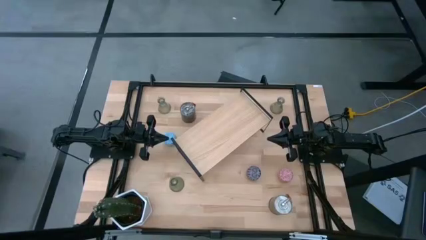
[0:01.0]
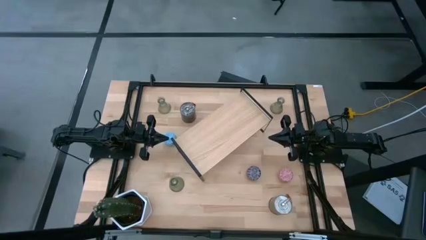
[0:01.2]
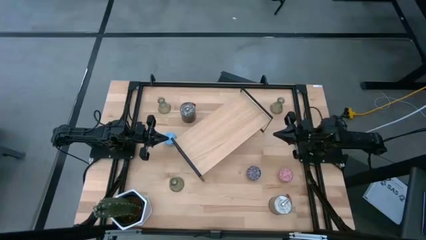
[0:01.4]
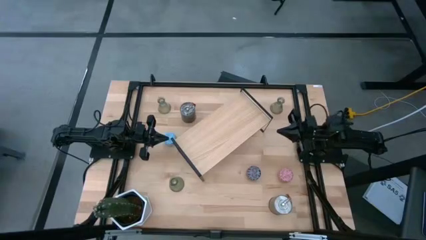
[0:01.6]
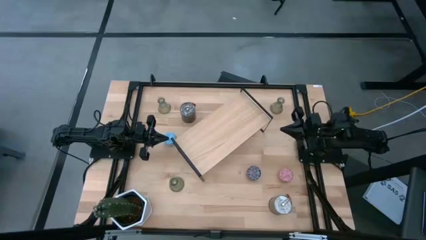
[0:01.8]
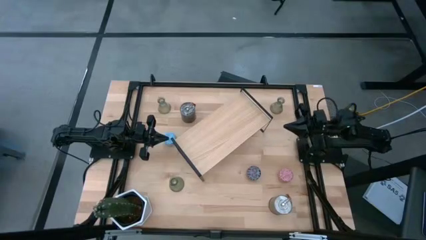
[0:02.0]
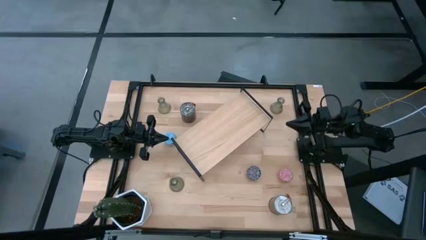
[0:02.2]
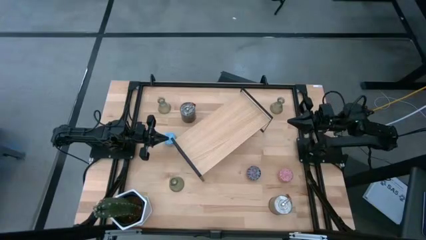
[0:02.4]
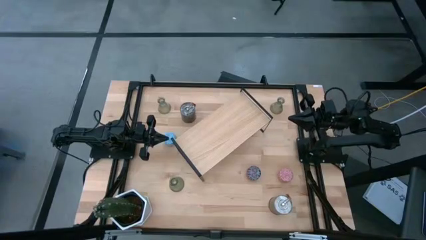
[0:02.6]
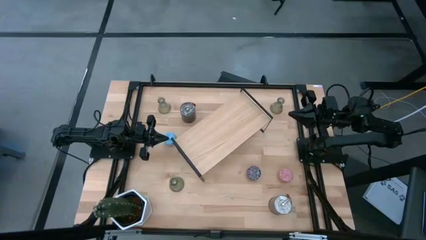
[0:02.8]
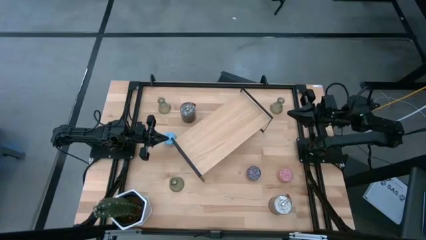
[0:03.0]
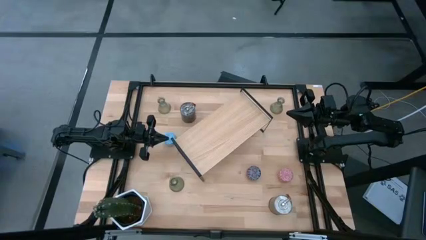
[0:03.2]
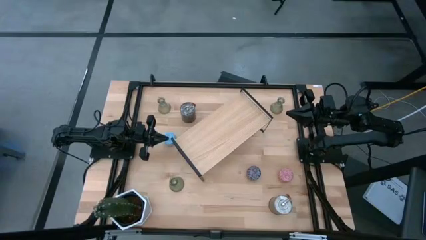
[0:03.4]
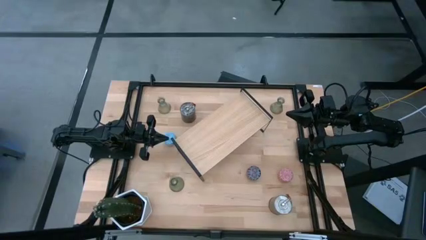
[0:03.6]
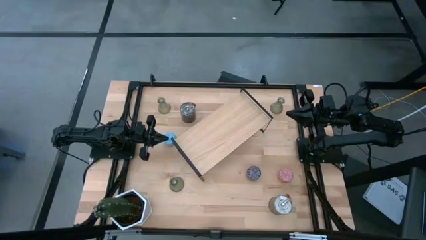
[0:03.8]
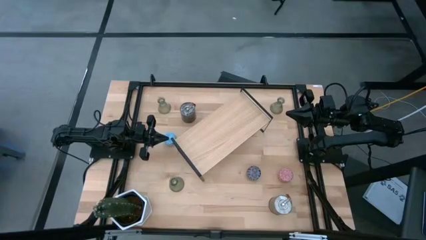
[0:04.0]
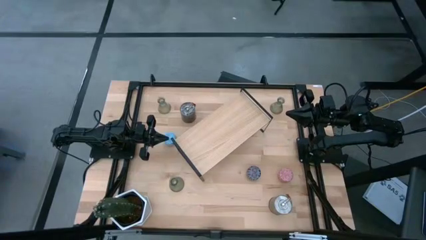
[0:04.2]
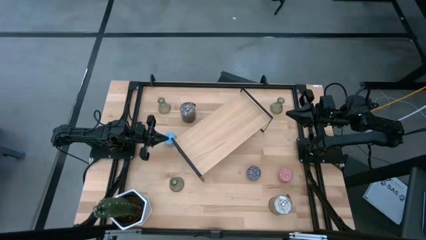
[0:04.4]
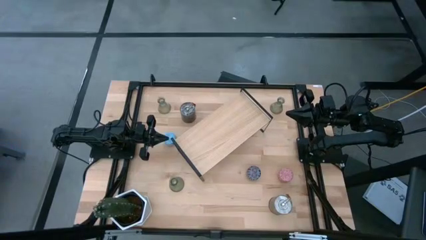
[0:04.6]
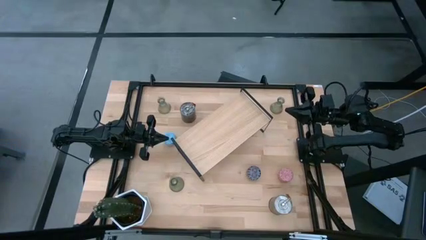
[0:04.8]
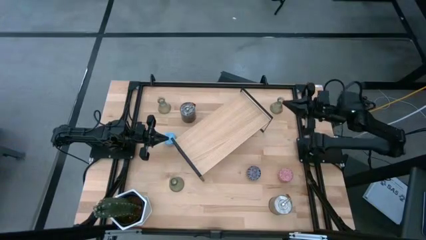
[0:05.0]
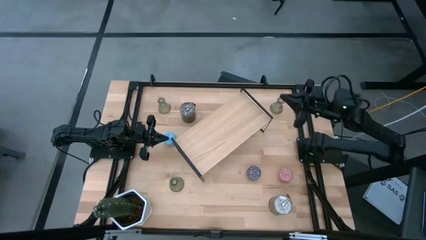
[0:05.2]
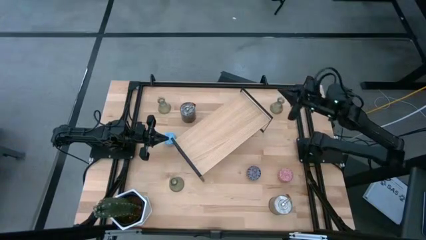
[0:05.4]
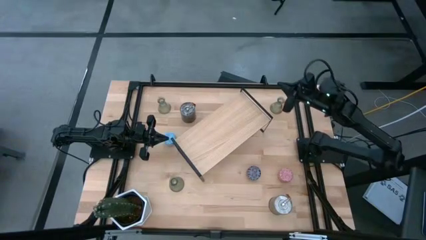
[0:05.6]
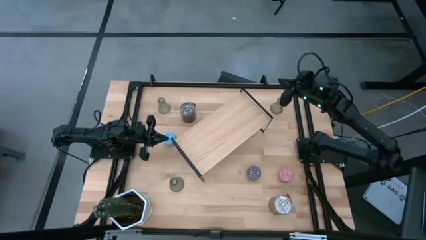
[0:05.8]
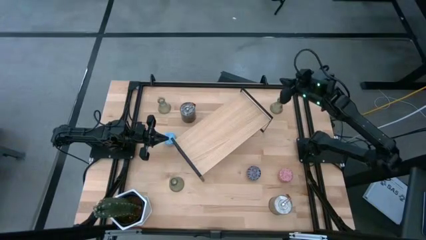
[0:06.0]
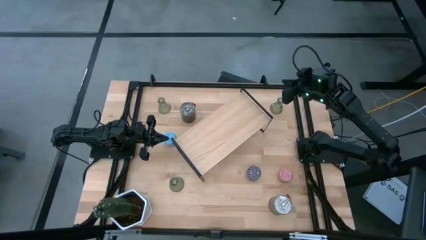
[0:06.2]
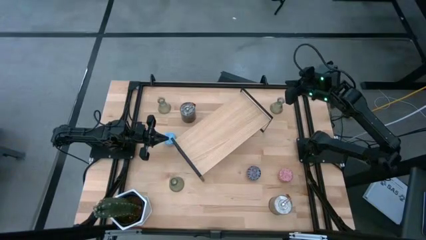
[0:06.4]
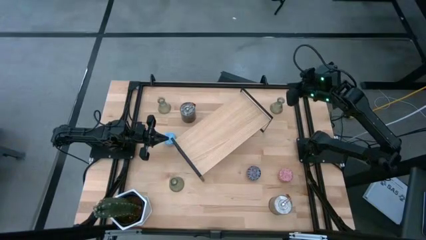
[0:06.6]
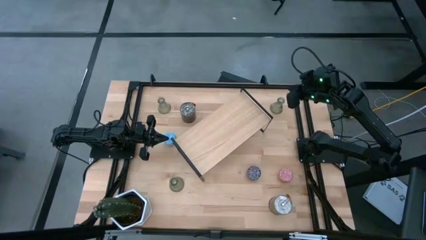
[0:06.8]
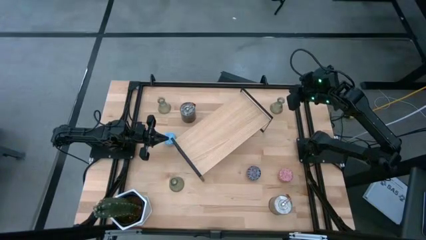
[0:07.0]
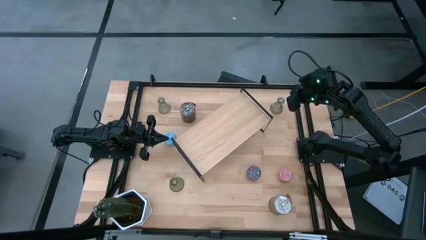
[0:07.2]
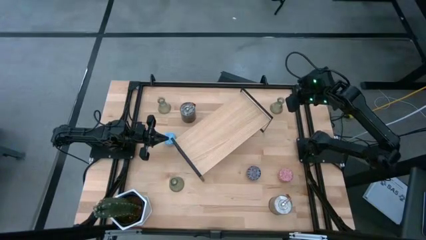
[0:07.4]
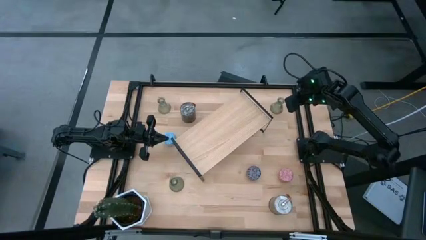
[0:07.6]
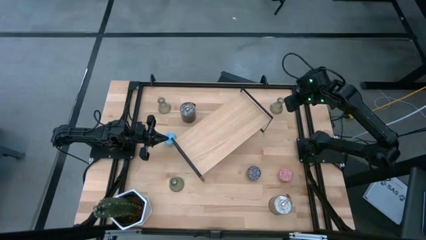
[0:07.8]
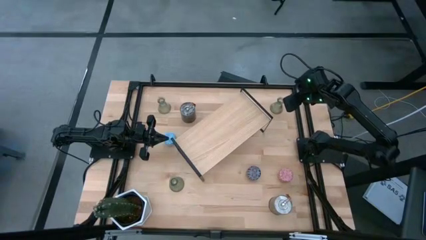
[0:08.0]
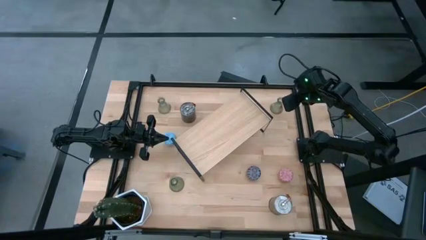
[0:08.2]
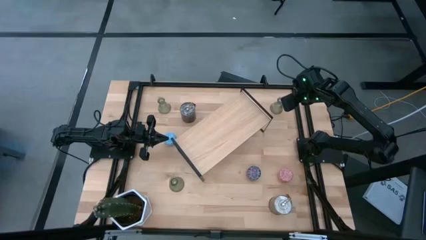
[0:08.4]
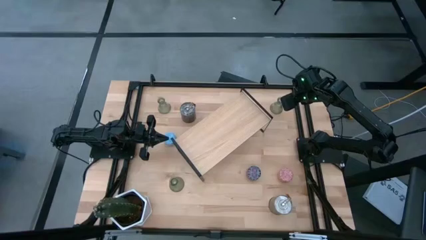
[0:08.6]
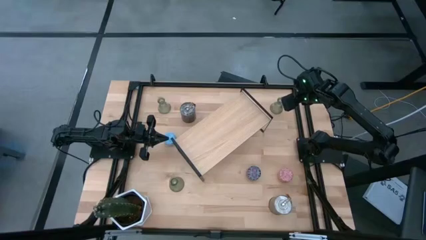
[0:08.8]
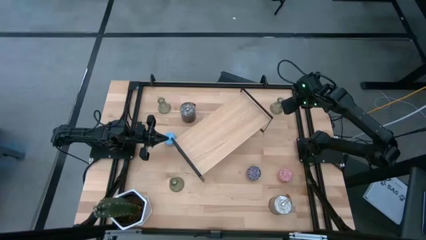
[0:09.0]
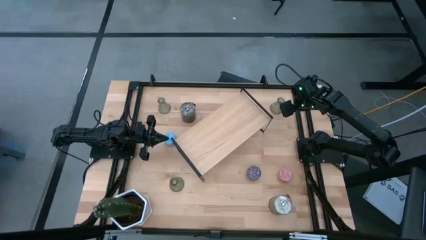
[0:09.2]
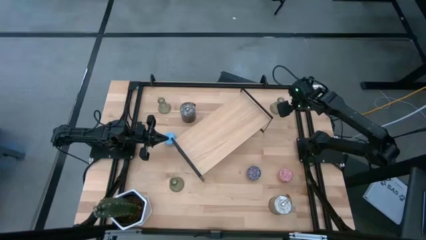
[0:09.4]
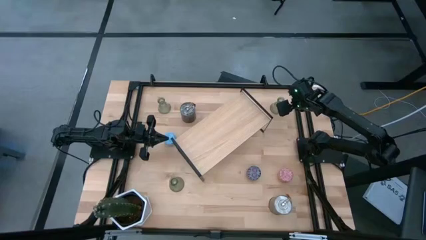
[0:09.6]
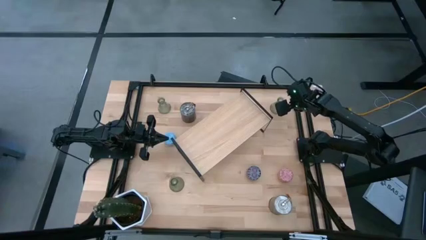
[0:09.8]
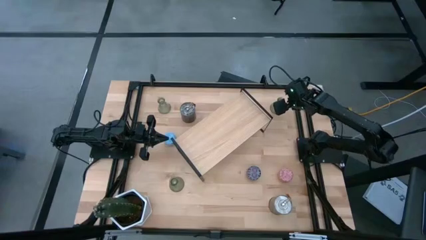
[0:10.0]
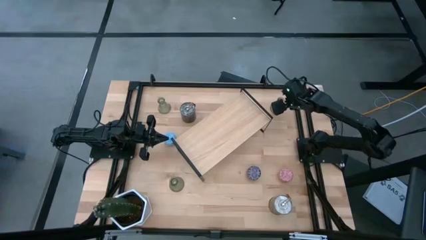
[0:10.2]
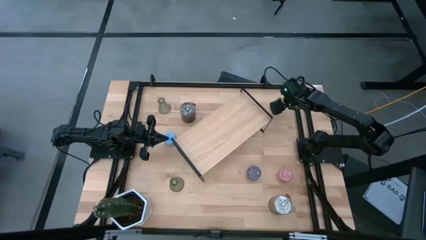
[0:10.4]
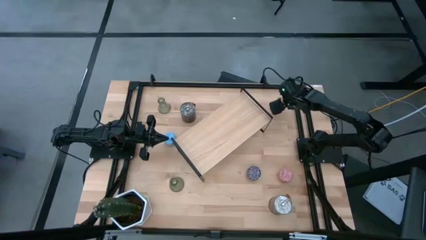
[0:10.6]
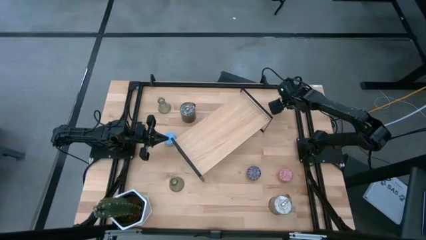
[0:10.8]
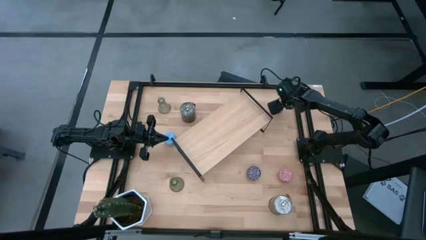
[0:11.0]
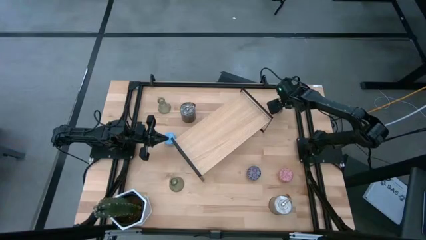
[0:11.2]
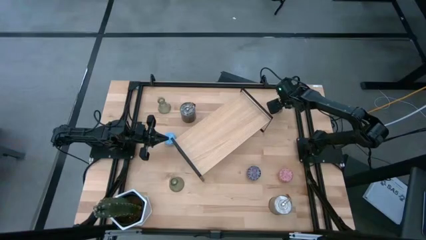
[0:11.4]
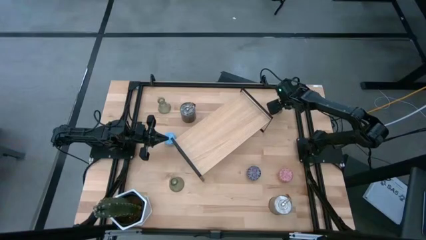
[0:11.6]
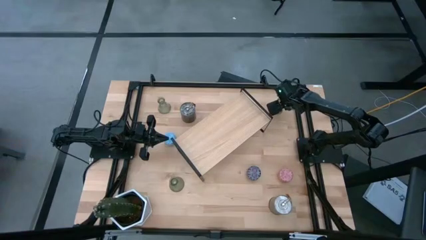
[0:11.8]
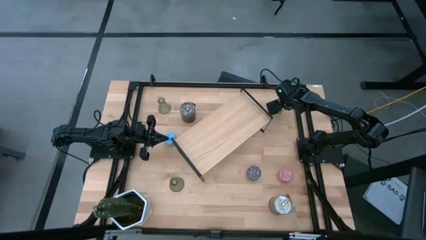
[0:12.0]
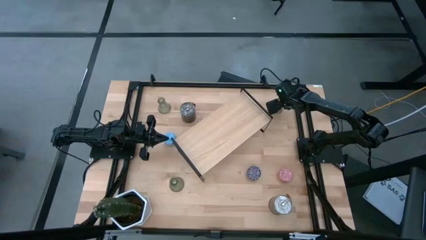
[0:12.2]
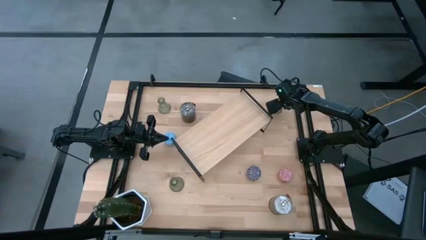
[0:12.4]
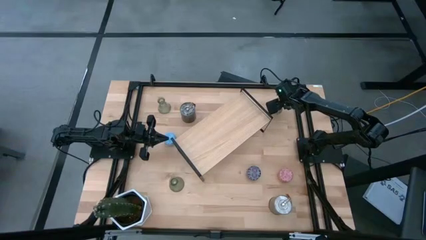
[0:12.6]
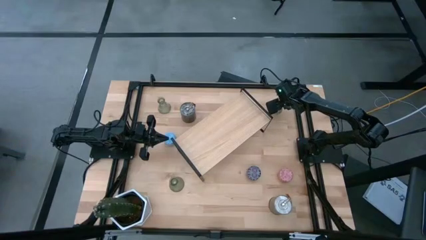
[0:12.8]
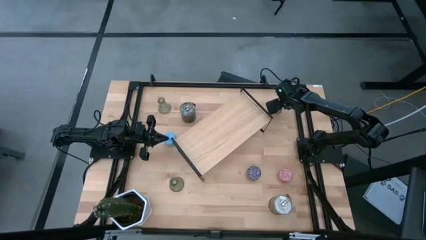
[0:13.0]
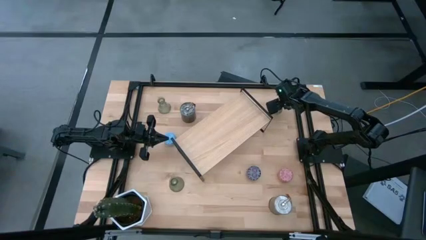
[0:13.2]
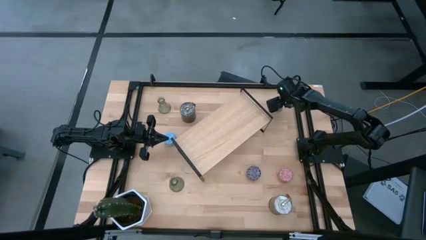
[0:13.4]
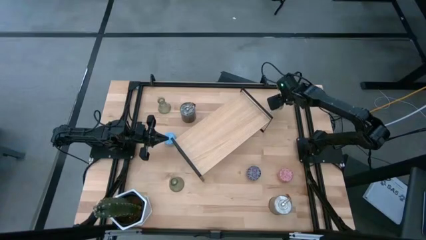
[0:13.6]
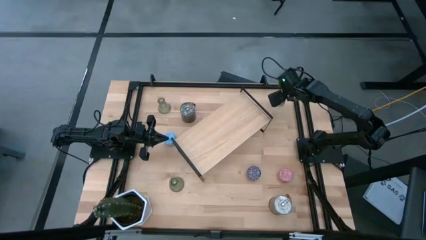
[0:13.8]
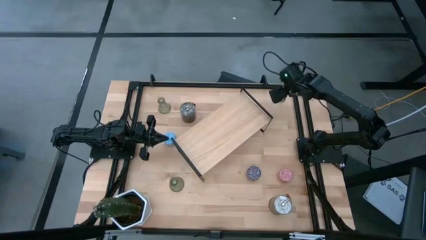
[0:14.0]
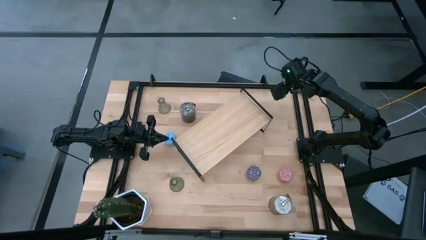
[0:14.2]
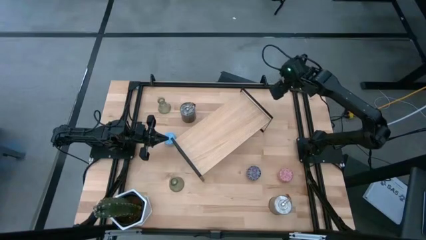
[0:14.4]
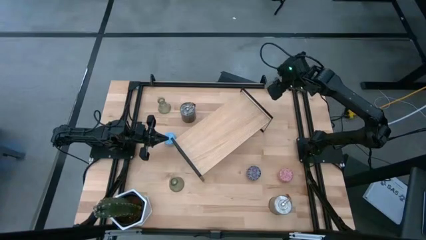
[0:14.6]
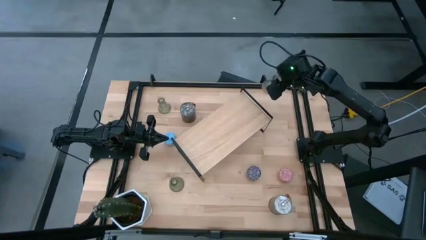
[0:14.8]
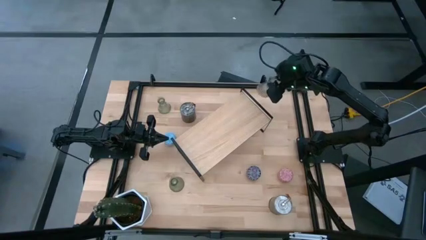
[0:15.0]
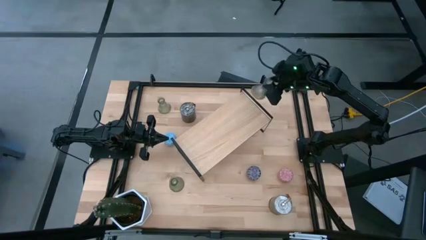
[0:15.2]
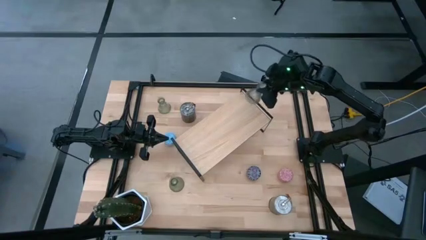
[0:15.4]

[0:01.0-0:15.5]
Task: Pick & Place candle stick holders
Put the top right transparent candle holder on the shelf
